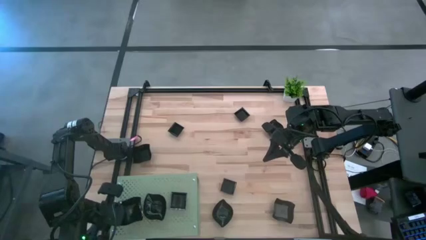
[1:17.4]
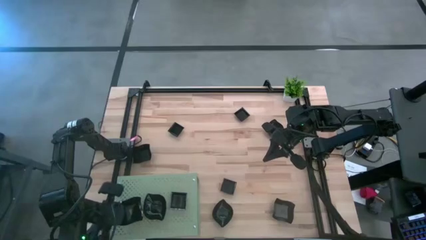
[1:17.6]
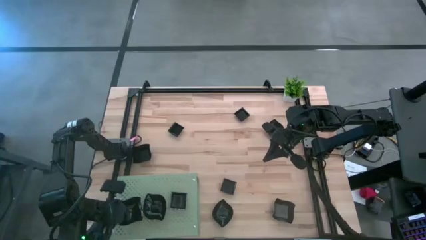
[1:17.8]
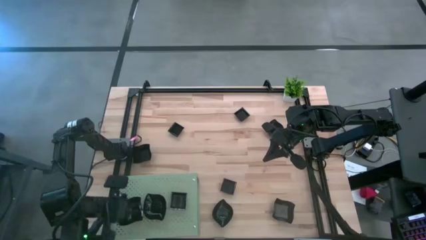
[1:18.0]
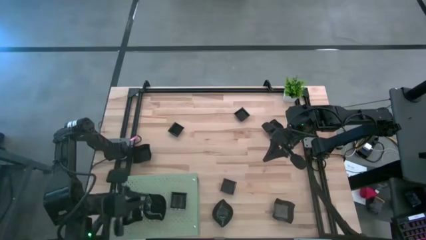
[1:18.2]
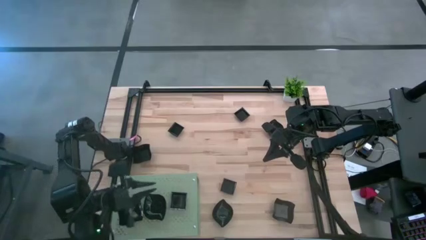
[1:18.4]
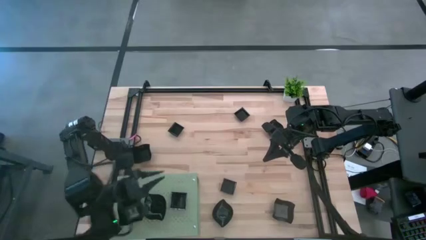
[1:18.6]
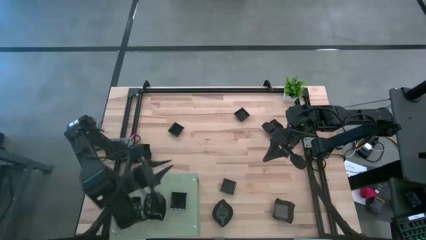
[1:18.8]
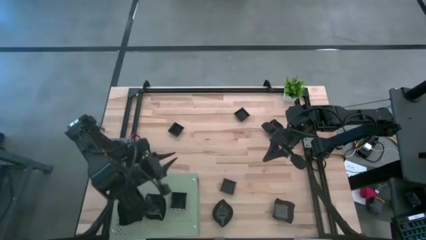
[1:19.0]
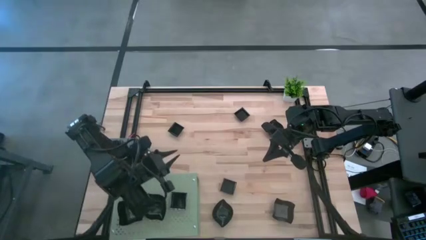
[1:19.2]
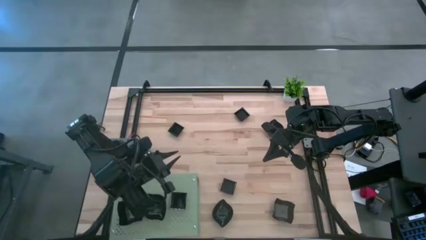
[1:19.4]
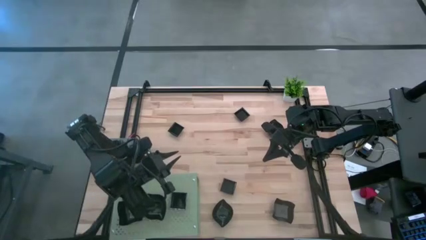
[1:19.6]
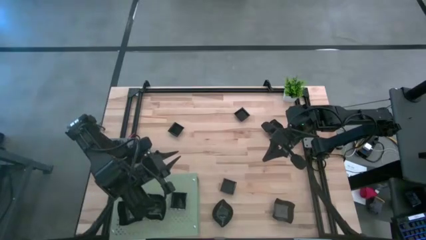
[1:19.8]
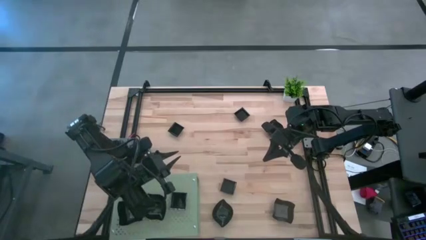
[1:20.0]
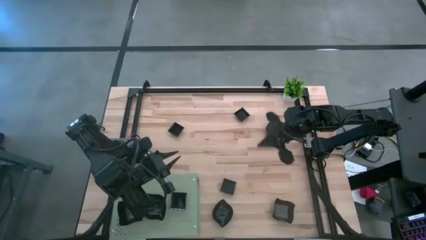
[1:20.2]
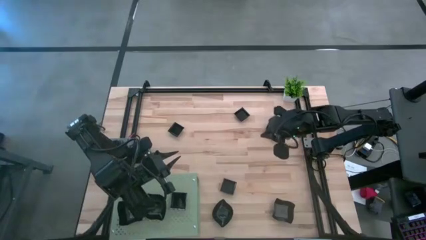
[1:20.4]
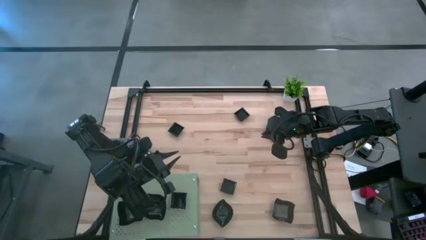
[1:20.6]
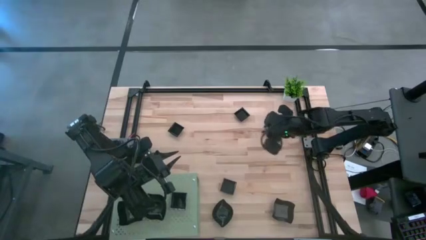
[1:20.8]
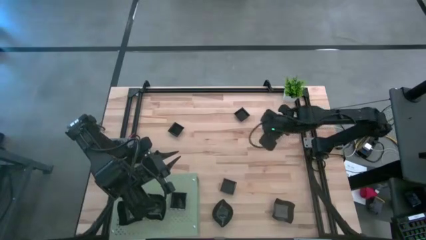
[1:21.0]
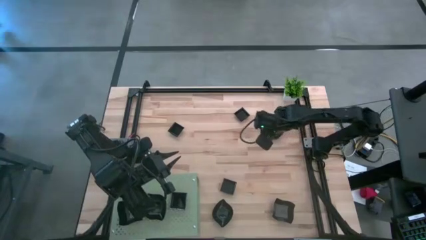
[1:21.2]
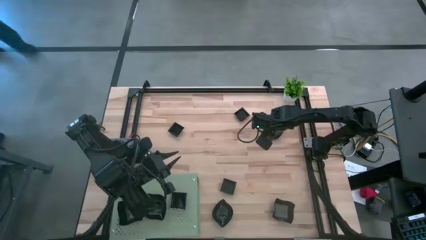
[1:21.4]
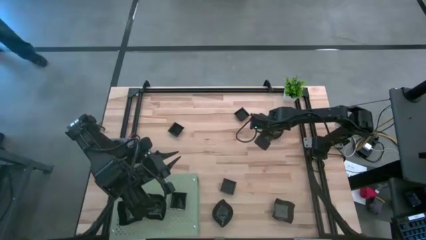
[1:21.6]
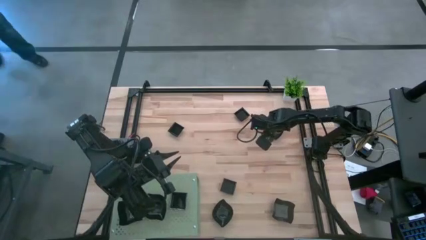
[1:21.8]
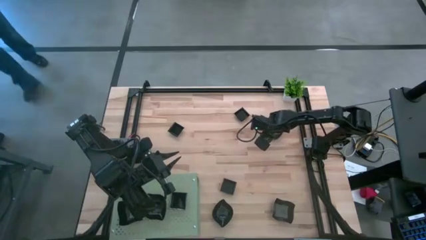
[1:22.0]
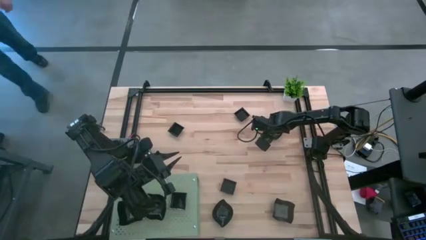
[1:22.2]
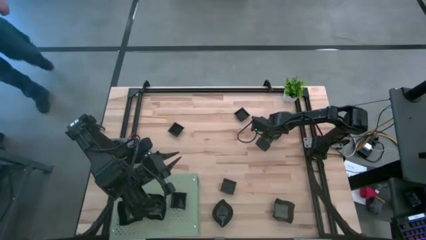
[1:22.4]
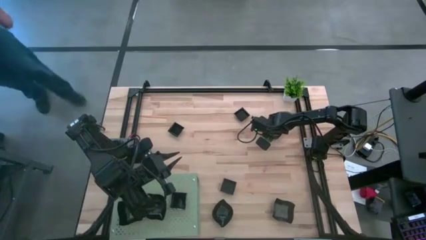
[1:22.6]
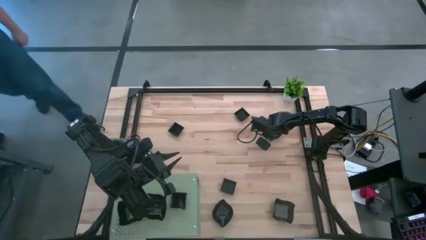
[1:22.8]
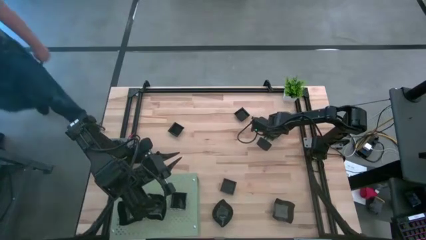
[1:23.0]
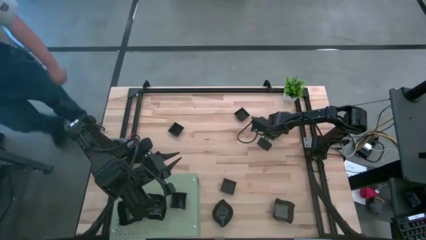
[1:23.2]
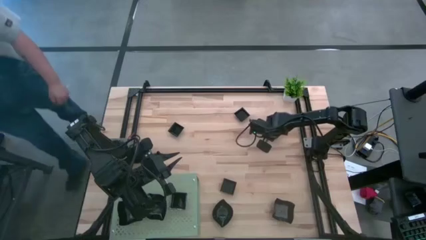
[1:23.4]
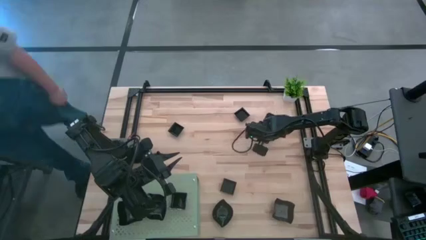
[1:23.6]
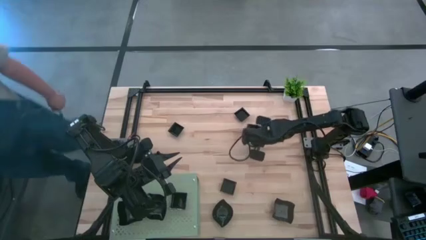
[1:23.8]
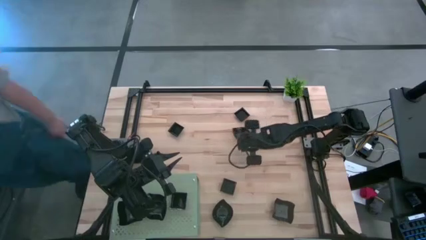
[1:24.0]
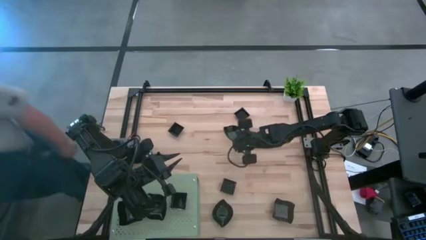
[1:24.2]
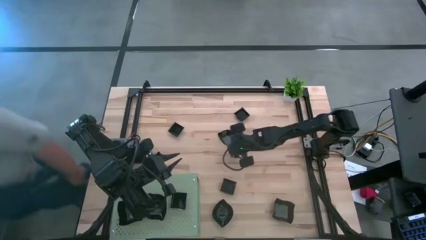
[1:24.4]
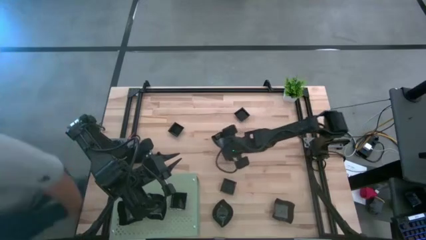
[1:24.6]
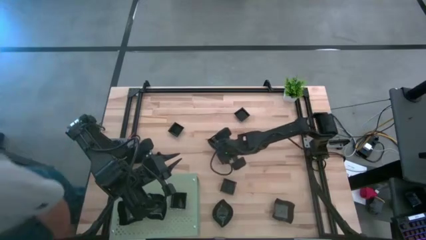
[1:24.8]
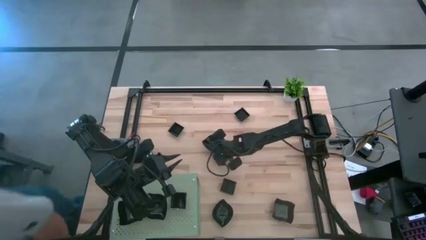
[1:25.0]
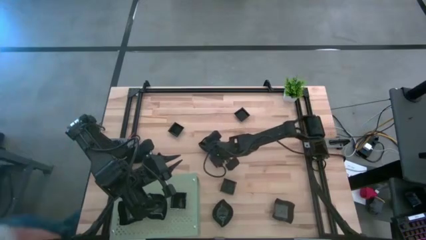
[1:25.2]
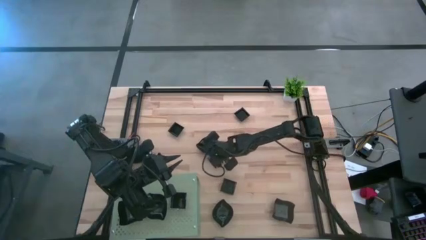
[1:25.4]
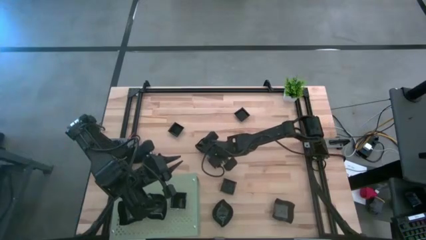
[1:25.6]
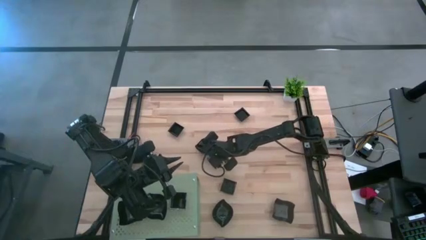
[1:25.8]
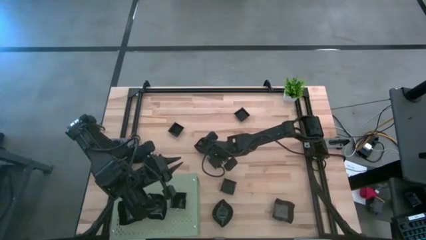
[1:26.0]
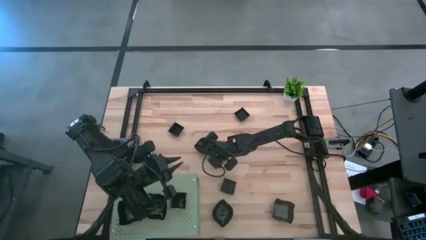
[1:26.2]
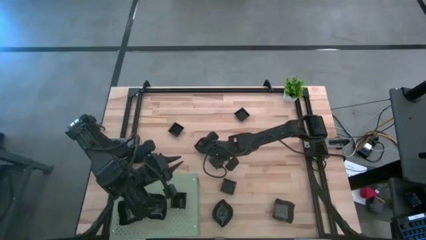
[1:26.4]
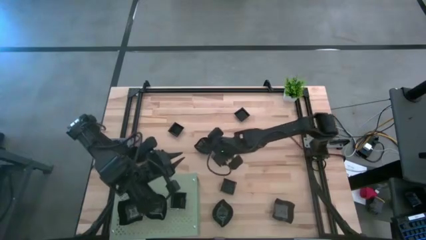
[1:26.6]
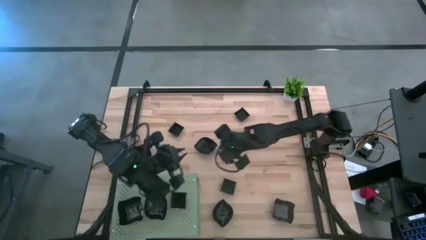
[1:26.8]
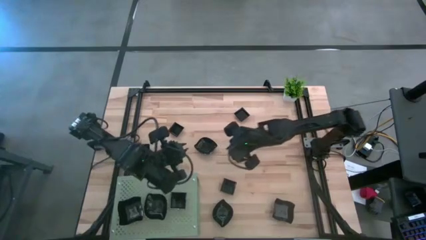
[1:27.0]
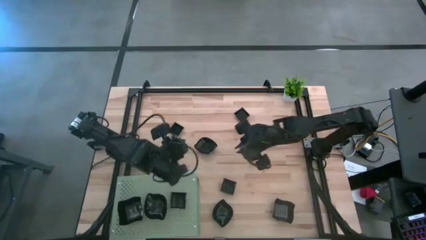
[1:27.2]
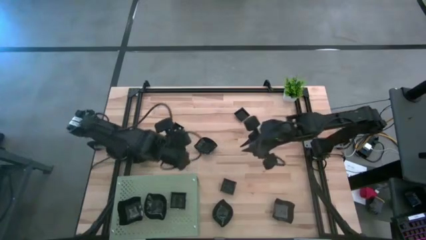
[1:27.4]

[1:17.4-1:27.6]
Task: Pick & Place Mini shaped plates
Stack the black leaf shaped plate on top of the other black leaf shaped plate on the shelf

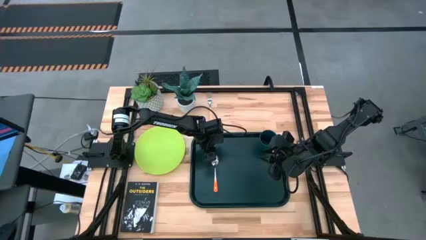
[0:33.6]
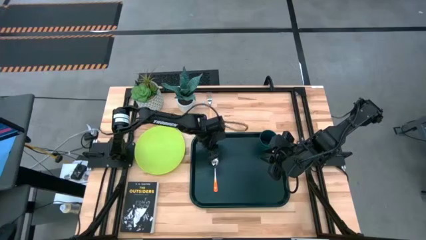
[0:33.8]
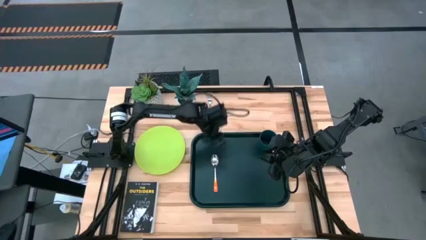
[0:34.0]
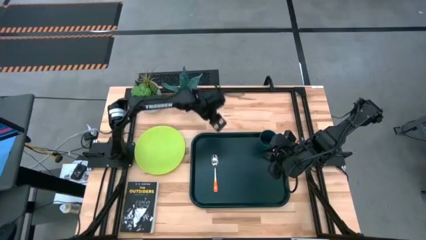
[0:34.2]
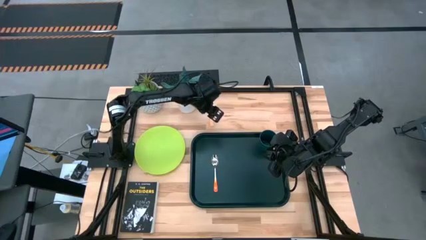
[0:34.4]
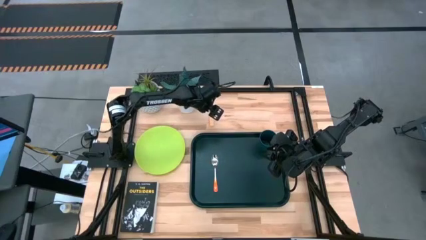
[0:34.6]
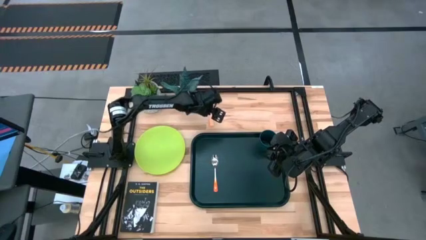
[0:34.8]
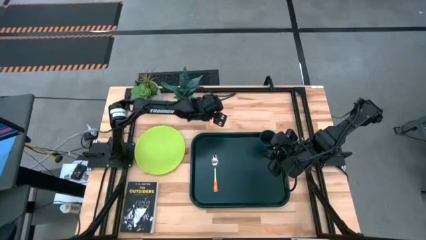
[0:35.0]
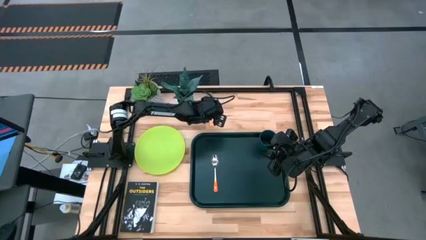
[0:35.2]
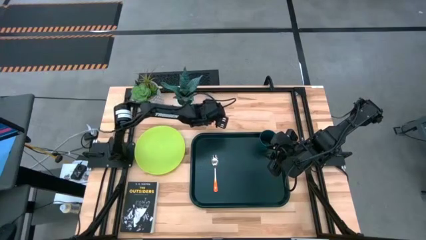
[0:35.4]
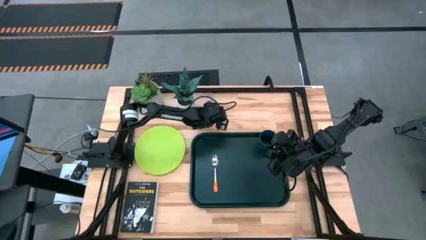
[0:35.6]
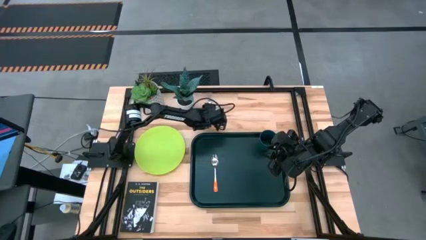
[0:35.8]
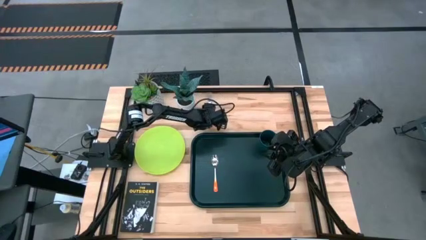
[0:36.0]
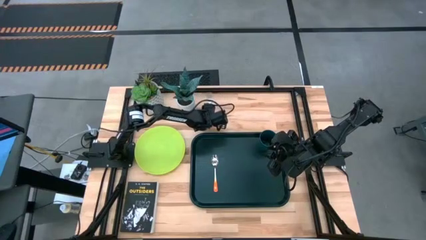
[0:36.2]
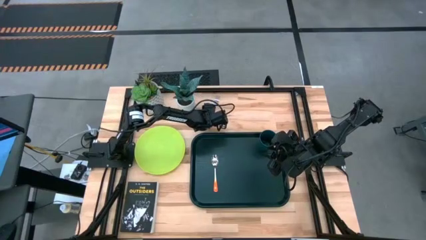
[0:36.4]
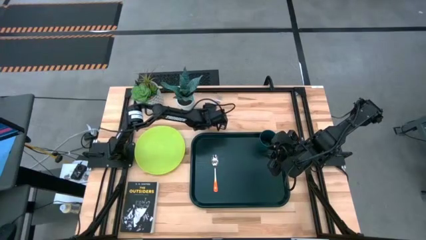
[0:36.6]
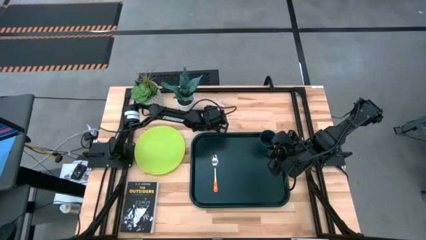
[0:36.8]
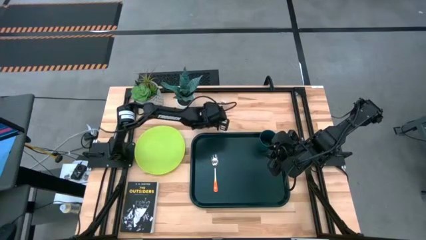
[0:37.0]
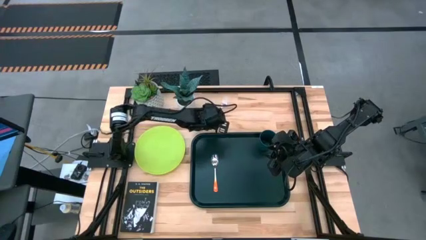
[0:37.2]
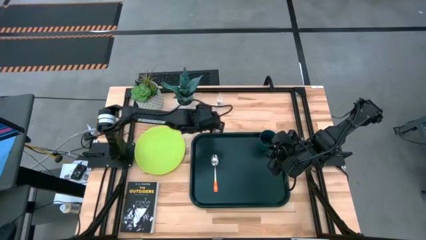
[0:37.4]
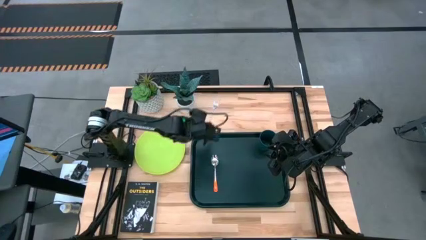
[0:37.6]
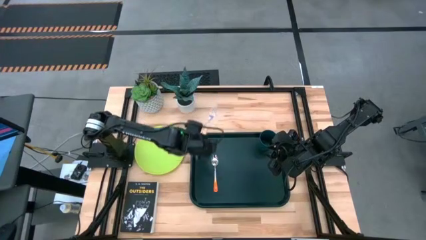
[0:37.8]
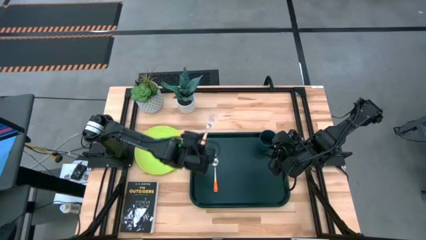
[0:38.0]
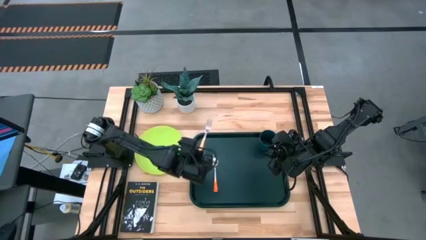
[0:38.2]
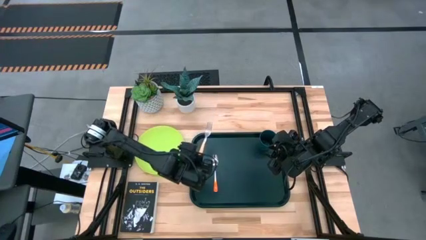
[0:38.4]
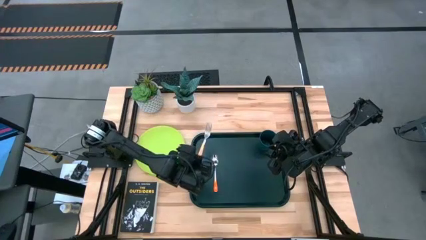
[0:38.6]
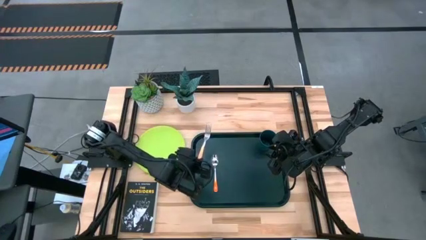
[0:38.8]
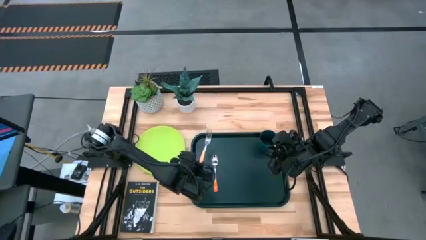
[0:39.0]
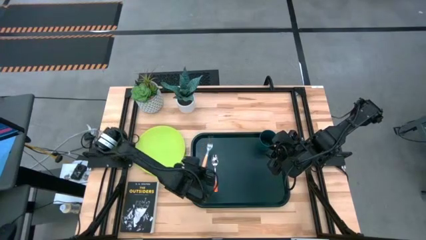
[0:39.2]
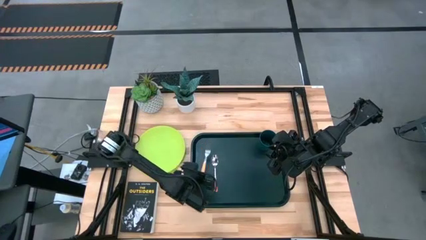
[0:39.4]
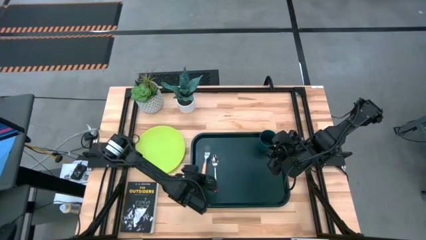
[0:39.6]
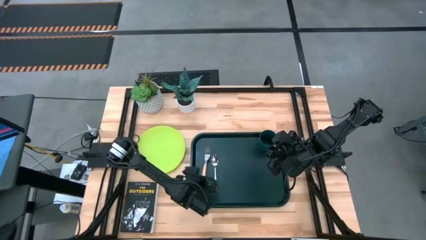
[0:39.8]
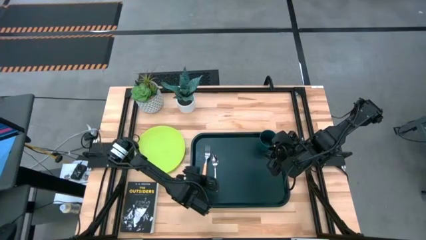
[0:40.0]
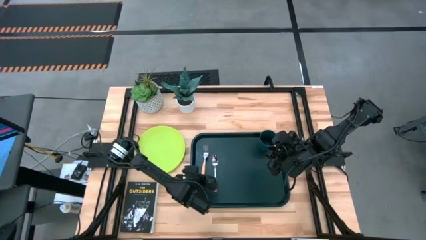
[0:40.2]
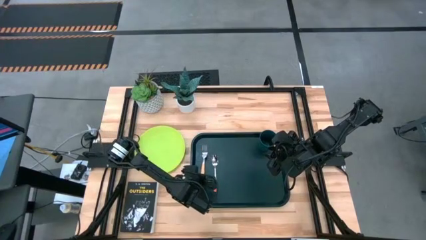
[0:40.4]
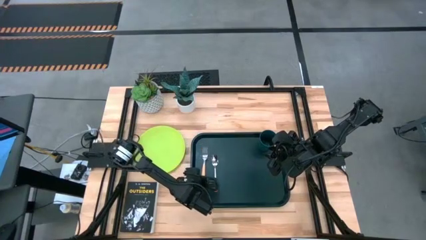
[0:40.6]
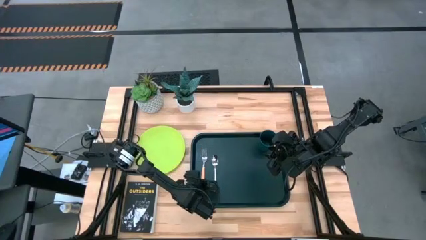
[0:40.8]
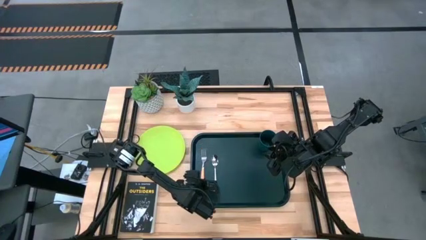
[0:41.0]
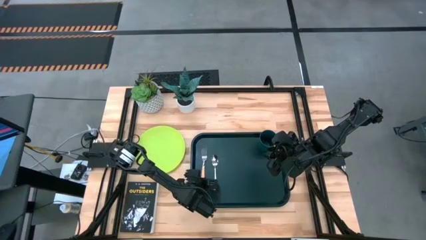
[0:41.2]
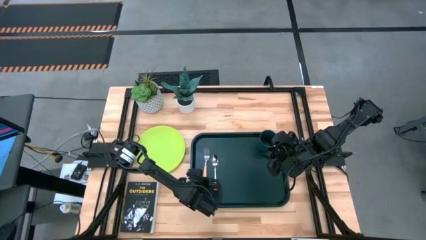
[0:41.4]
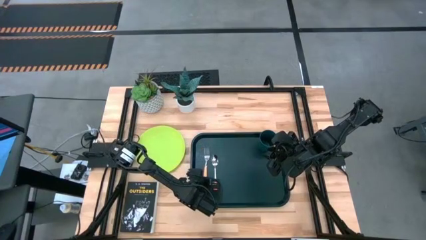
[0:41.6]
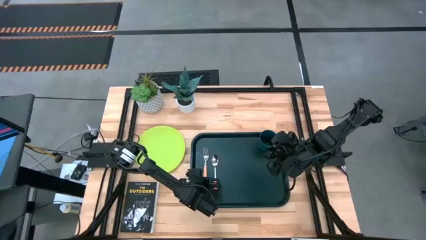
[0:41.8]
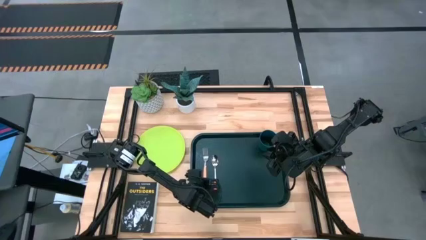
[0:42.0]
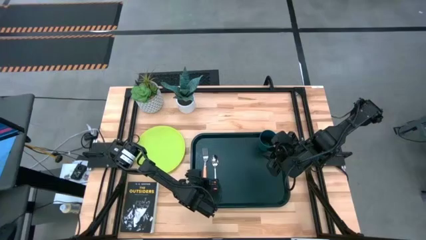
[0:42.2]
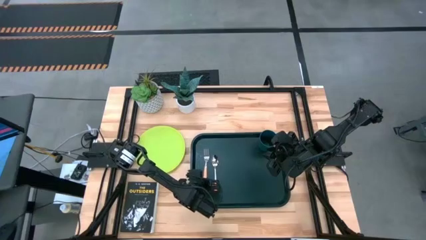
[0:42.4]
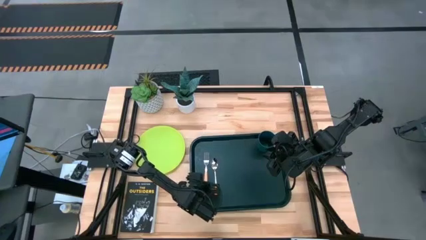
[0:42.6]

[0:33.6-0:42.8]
Task: Pick and place plate/cup/fork/spoon on tray
Put the yellow fork to the left of the orange white spoon on the black tray
